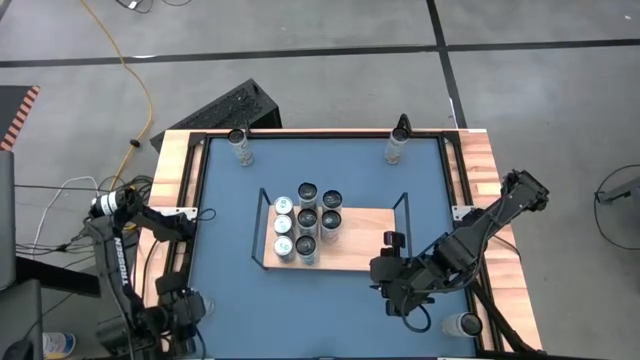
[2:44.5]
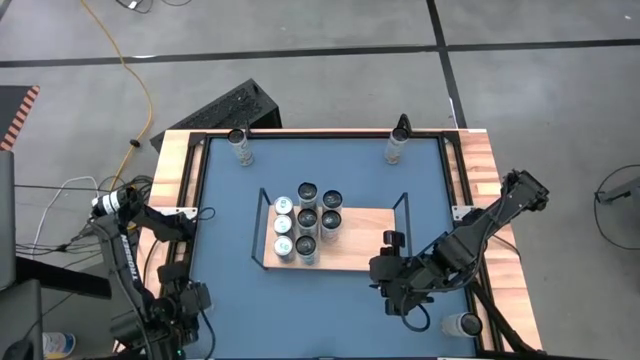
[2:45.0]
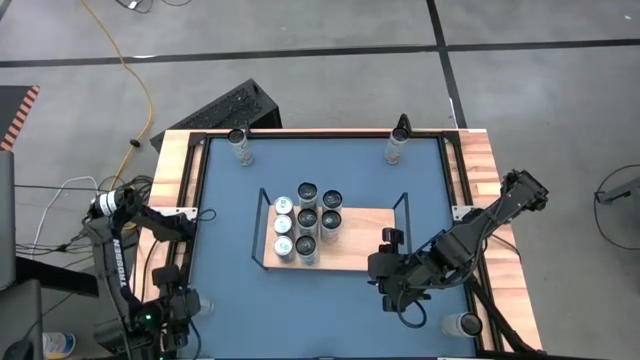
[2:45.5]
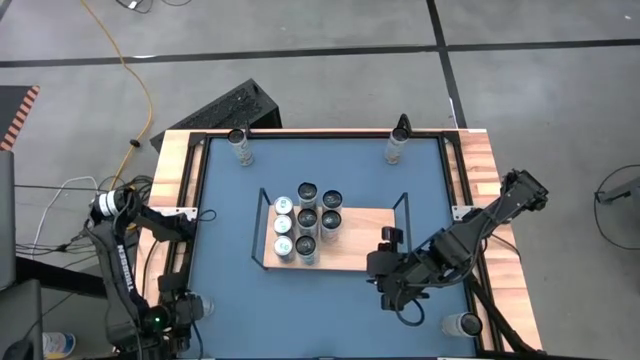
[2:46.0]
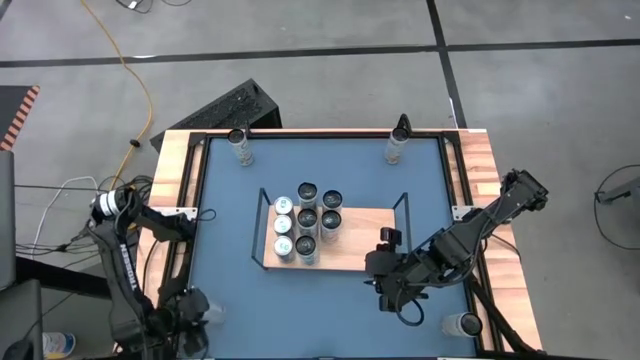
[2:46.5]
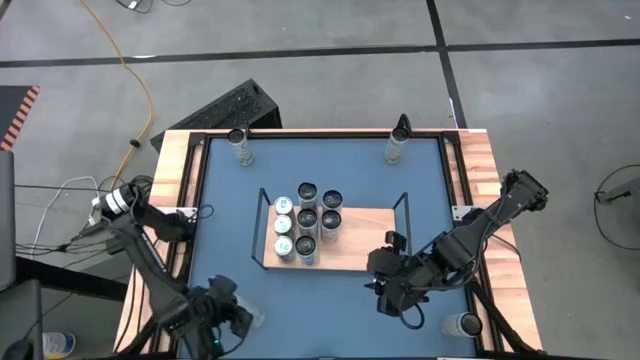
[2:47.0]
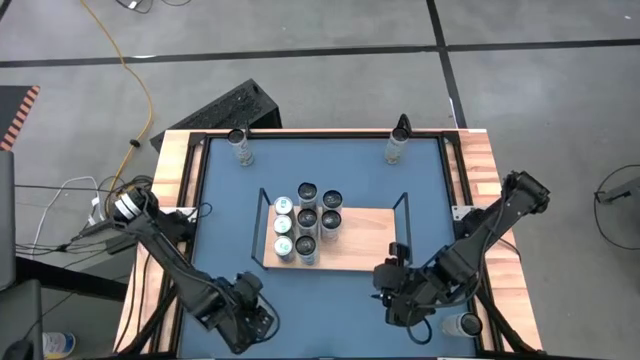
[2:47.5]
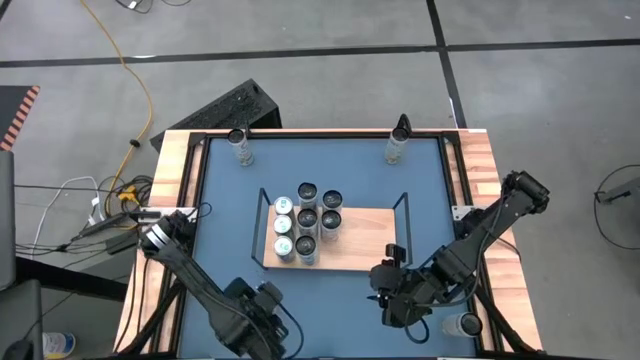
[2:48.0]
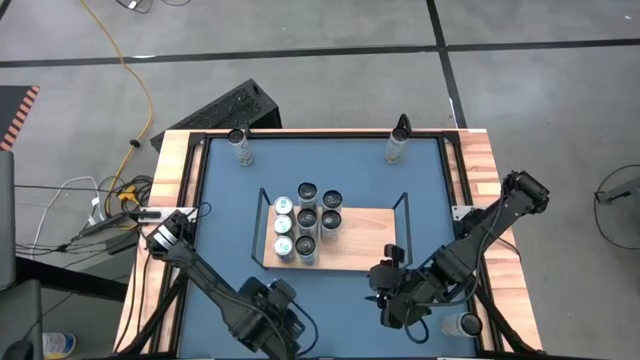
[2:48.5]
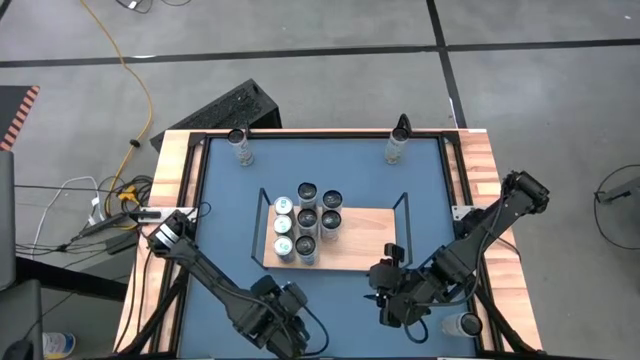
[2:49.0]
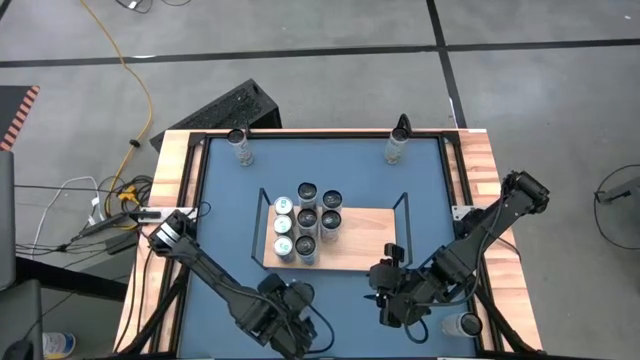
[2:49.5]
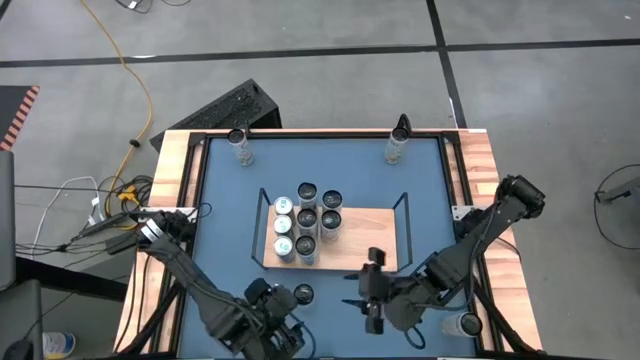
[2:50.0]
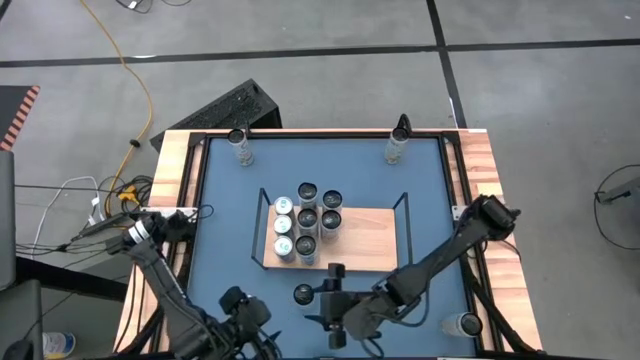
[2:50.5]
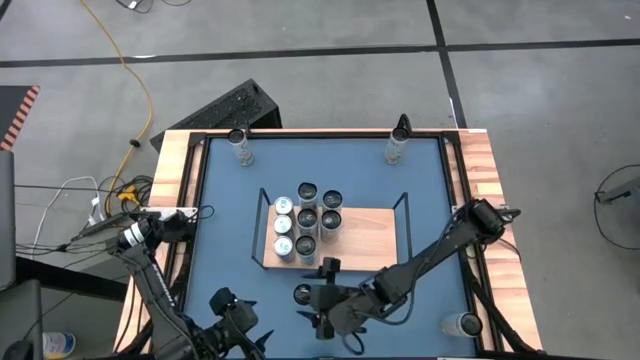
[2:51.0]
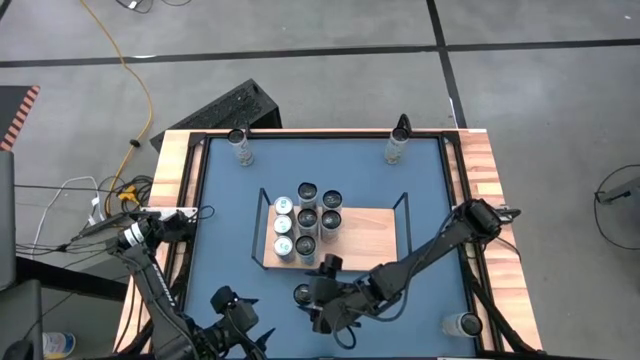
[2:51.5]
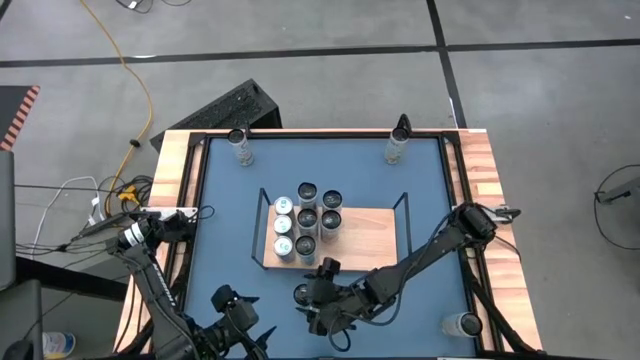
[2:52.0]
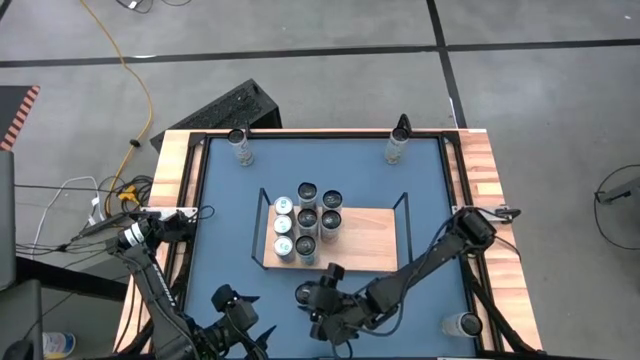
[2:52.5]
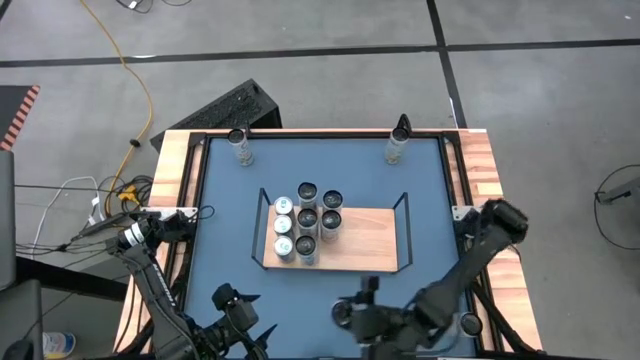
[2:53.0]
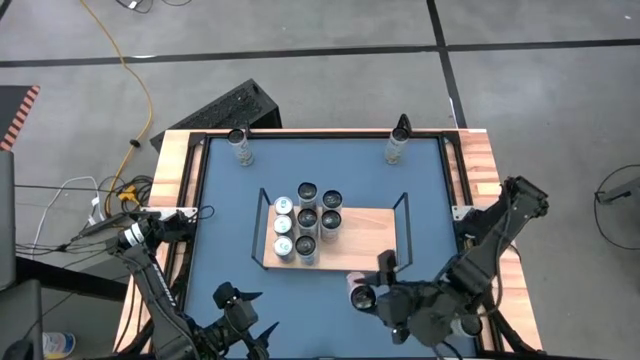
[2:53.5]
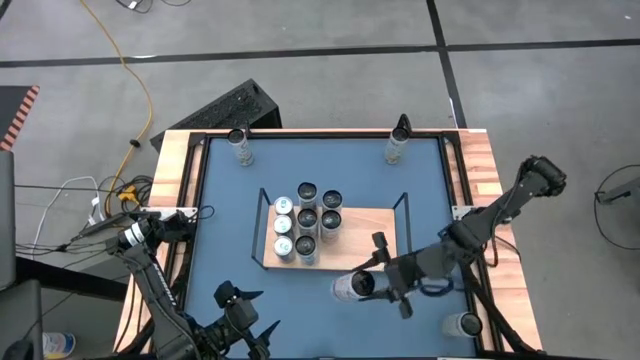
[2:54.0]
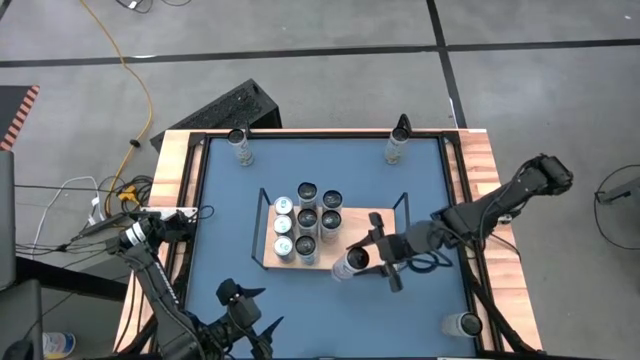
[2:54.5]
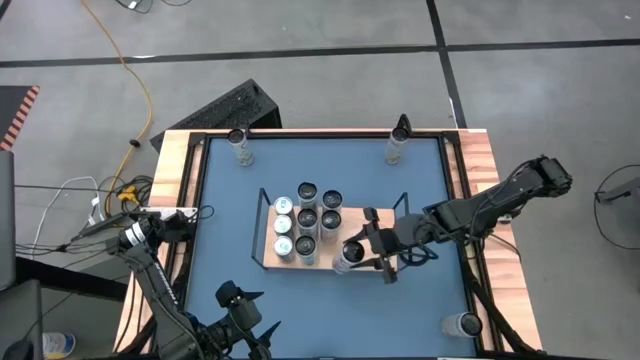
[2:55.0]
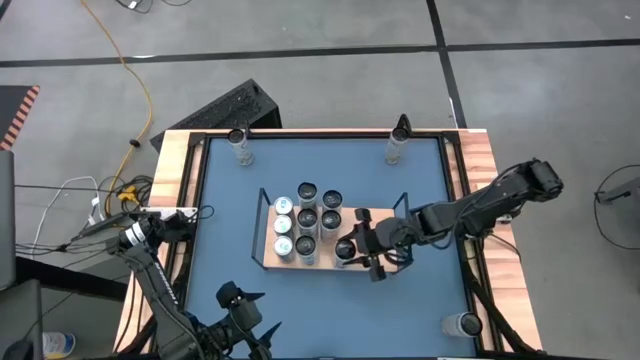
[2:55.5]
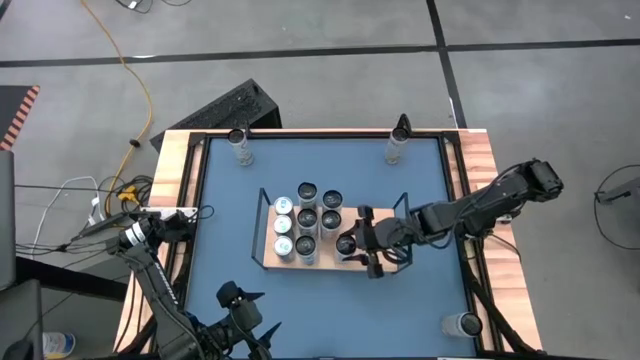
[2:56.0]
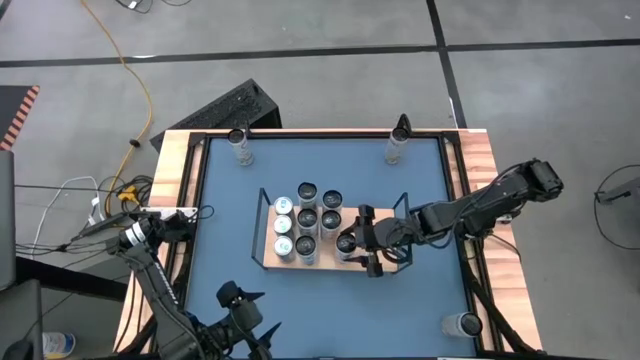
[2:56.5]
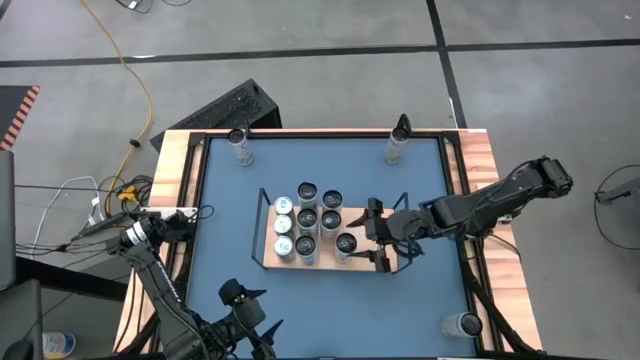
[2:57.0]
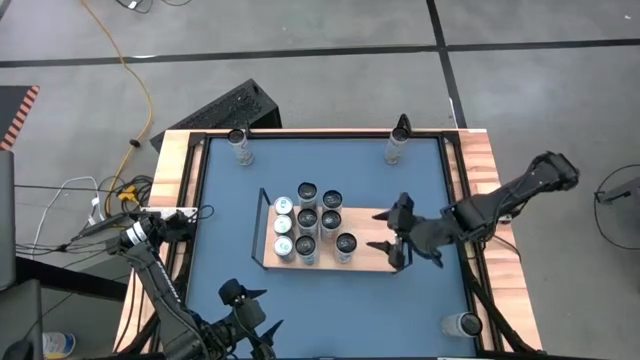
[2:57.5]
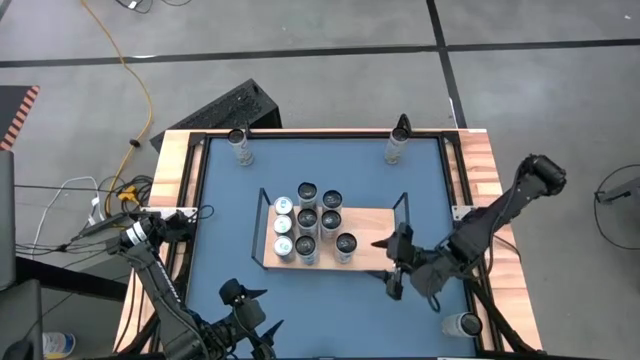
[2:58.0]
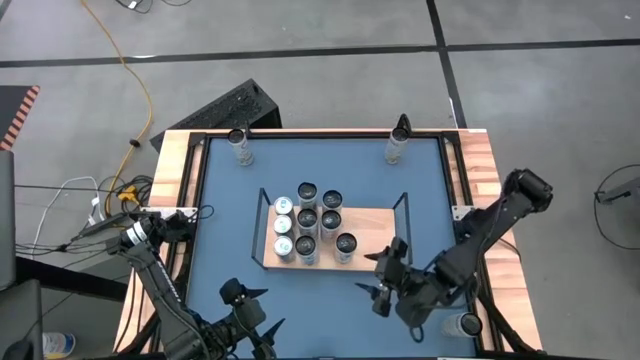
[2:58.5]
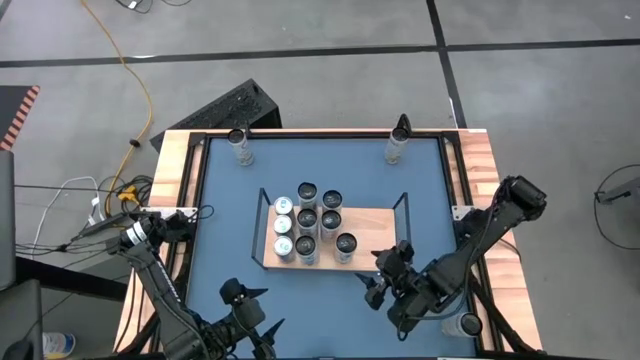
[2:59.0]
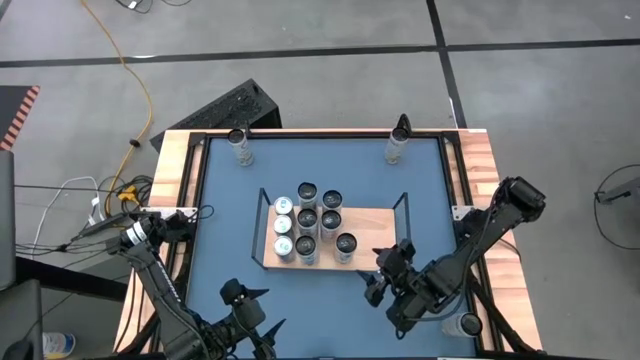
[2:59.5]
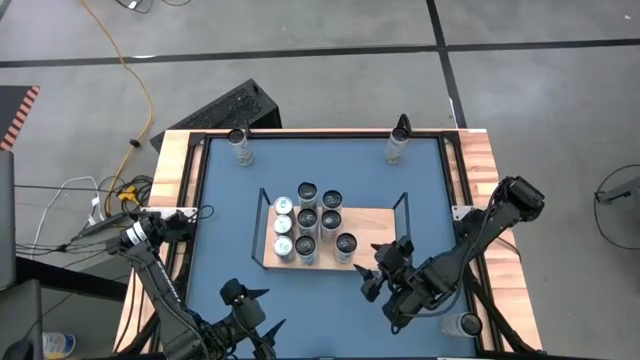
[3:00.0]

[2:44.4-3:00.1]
Task: Place canned beverage on shelf
Put the pink soda can on the shelf aligned with the other pink soda cans

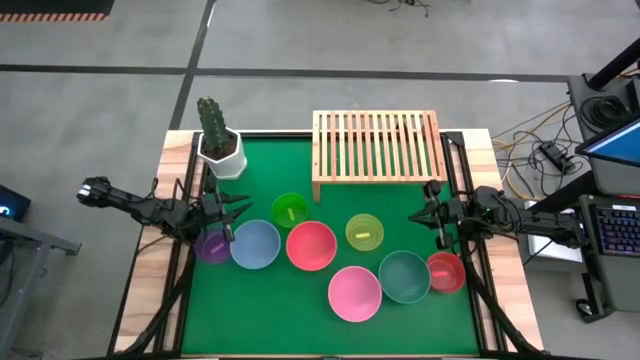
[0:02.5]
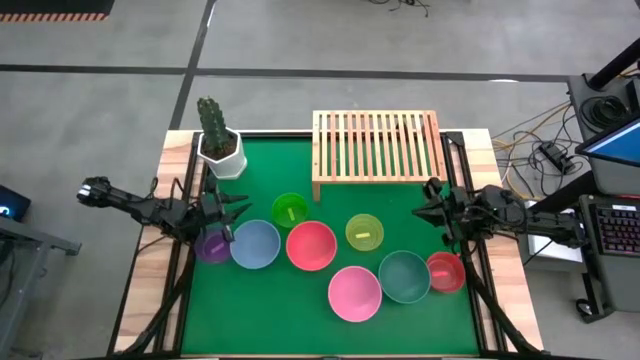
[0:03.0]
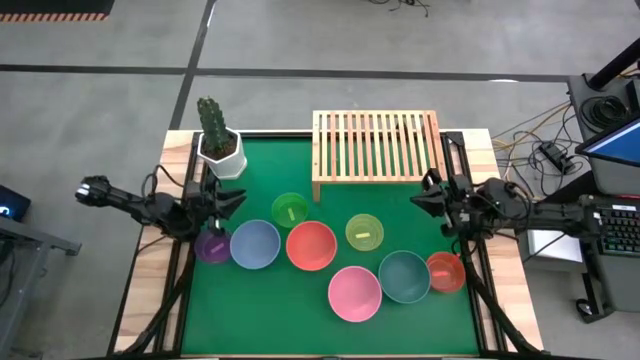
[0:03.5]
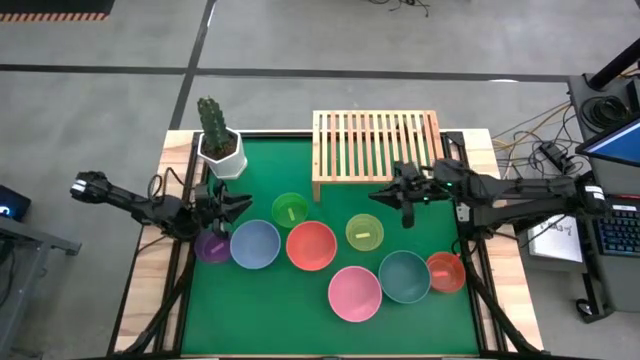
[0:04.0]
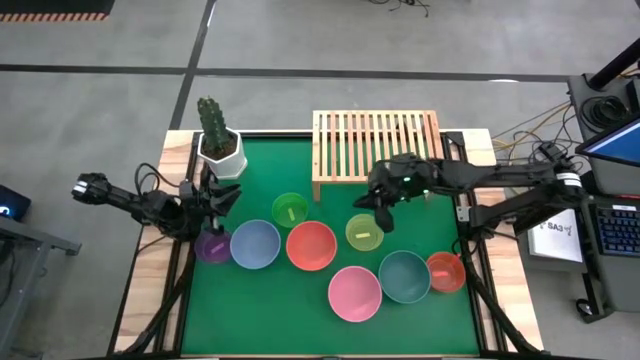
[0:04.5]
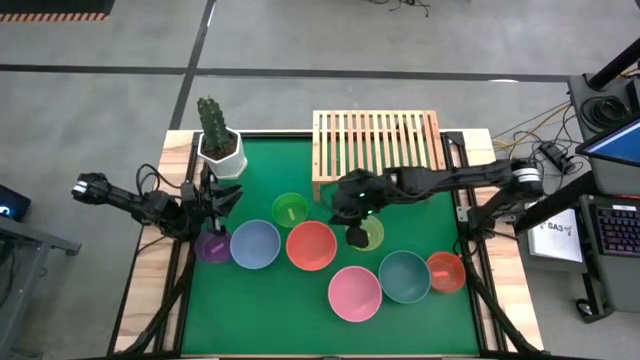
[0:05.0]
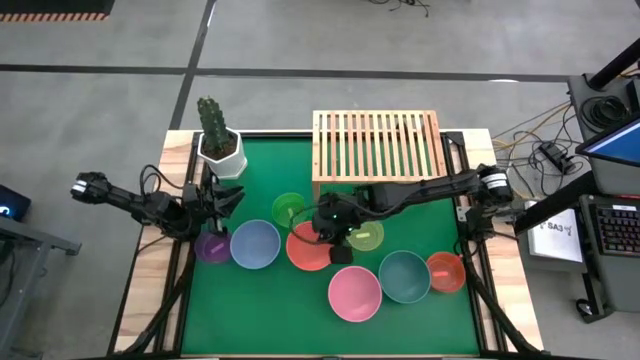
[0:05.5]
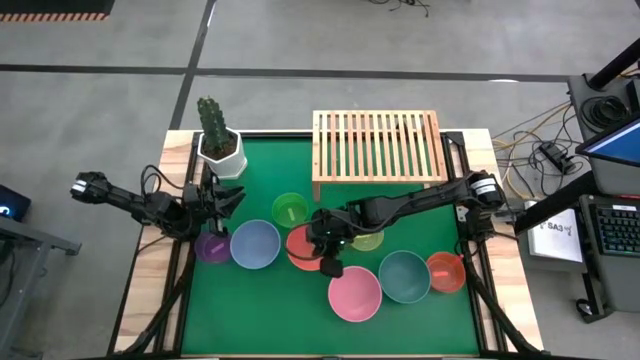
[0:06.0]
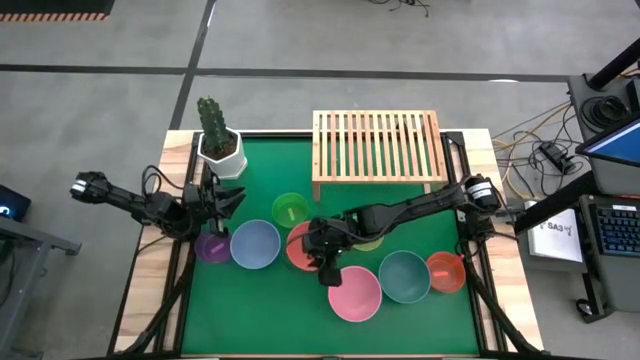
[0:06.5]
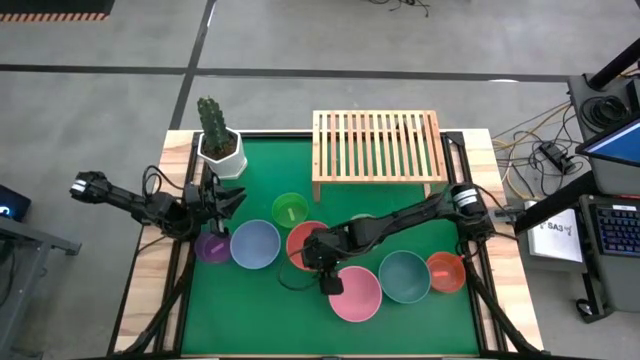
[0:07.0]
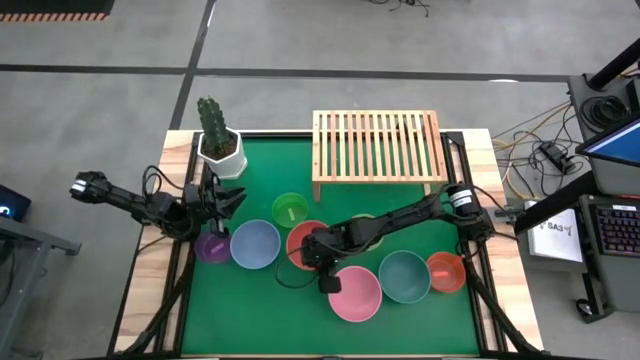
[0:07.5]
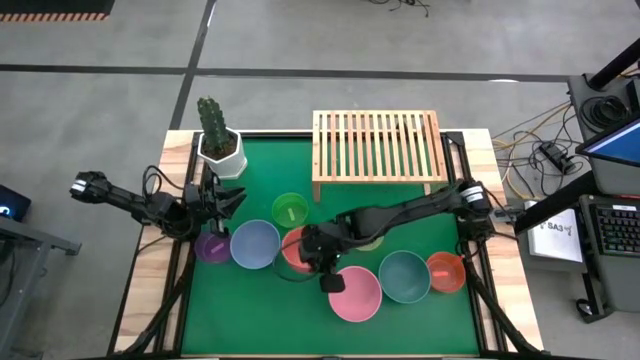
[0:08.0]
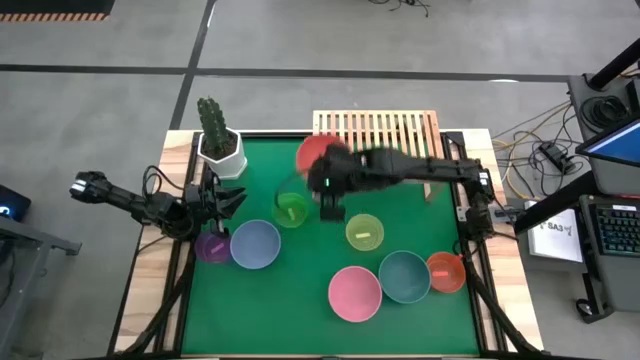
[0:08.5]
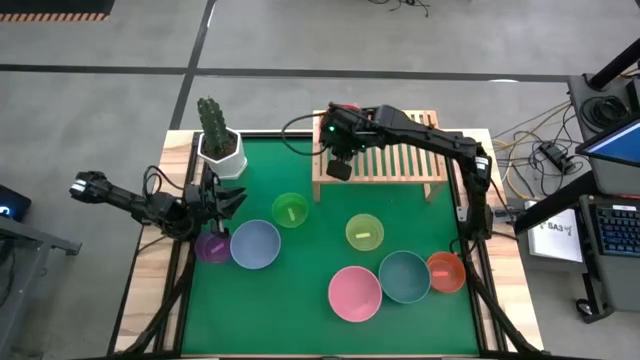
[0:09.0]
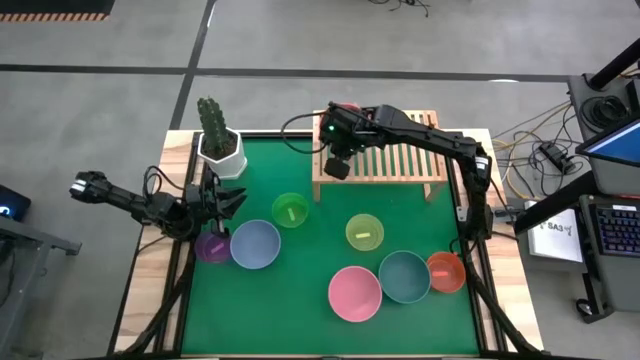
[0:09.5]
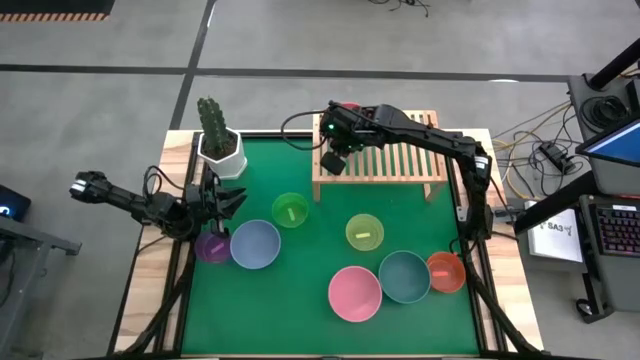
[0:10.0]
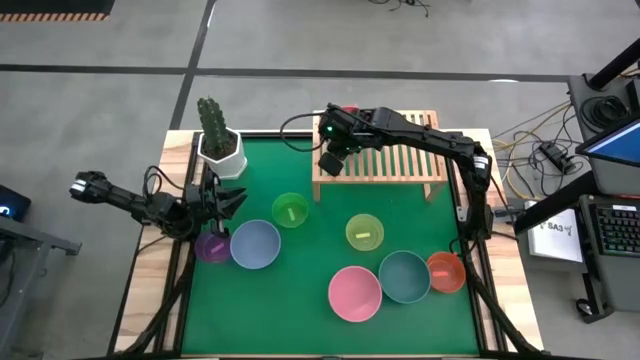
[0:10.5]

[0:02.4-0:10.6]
Task: Place and stack bowls onto a shelf
Put the light orange bowl on the shelf
